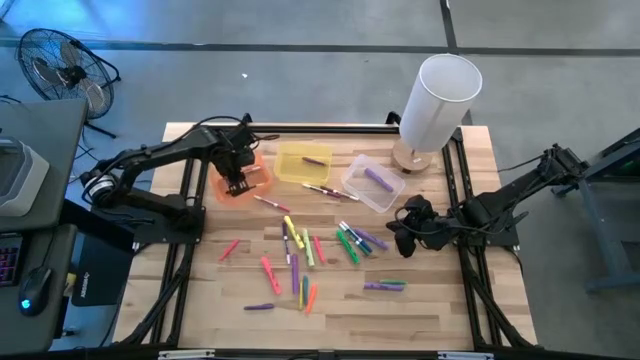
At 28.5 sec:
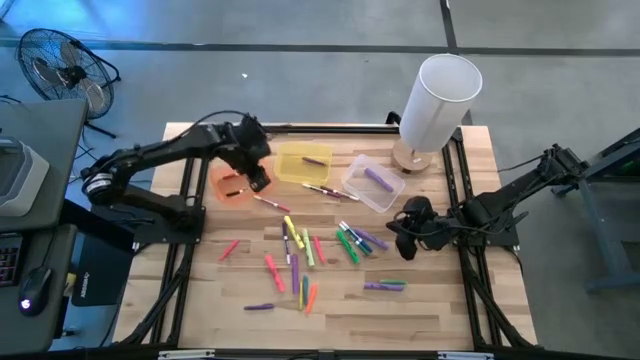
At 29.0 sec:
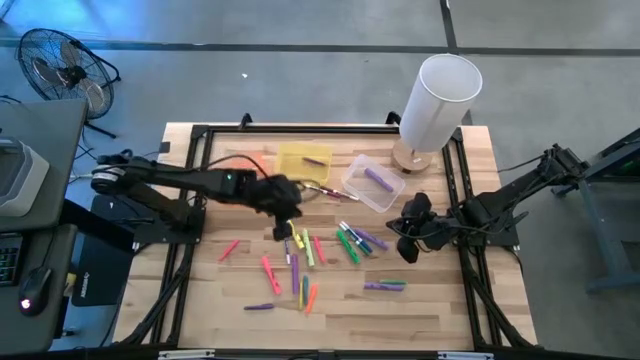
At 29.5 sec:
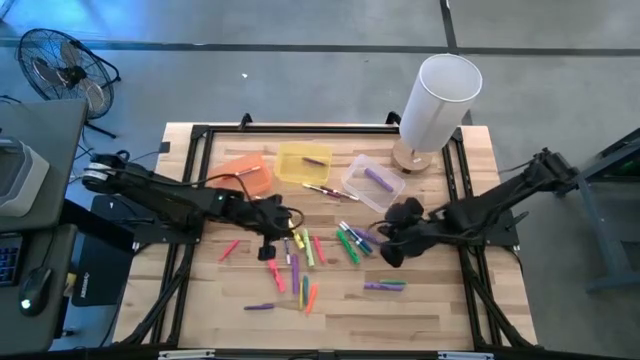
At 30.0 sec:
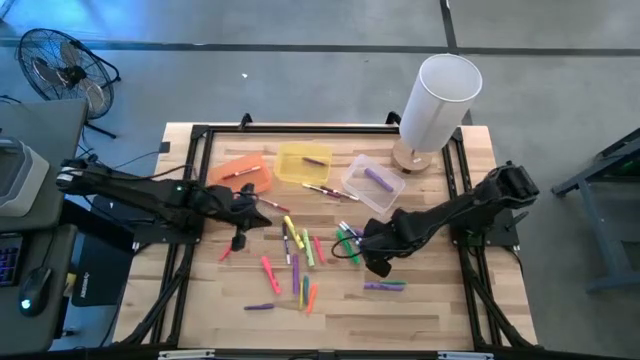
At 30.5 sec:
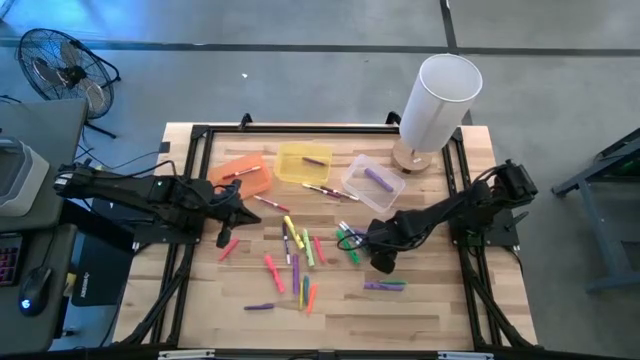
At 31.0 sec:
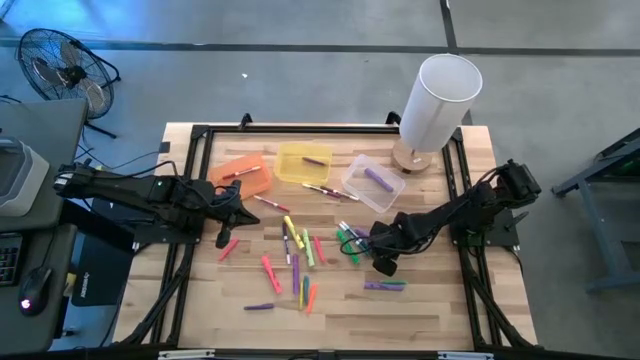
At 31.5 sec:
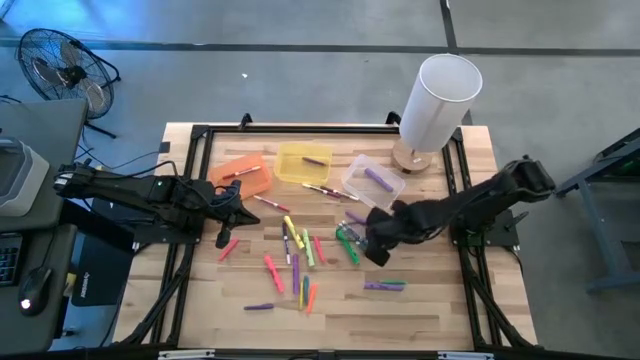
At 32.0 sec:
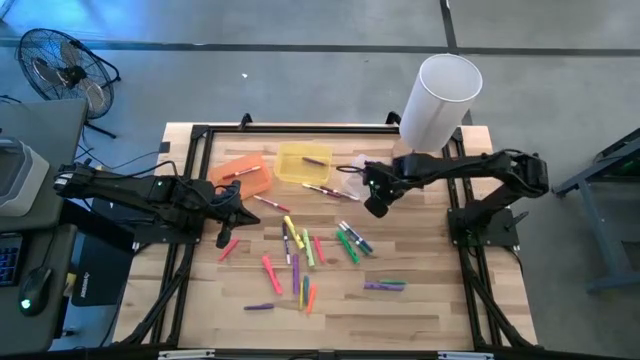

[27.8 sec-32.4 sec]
Task: Pick & Place Markers
Put the top purple highlighter pen into the white bin

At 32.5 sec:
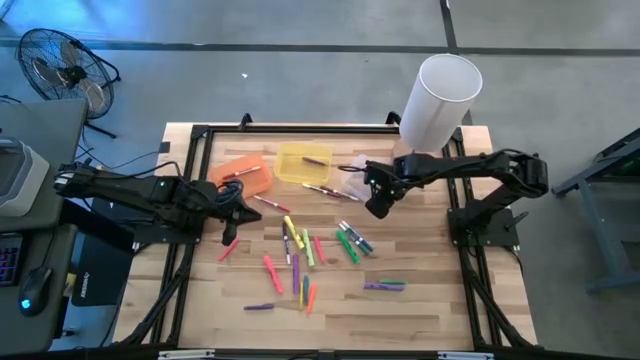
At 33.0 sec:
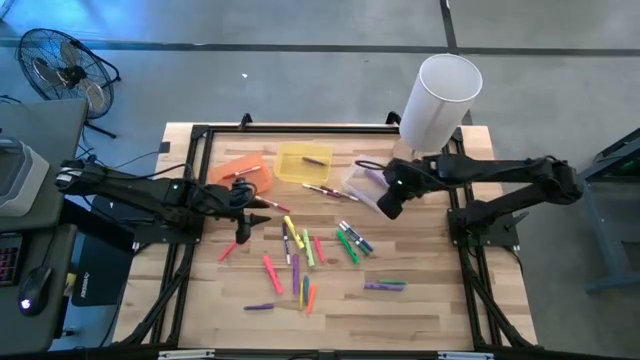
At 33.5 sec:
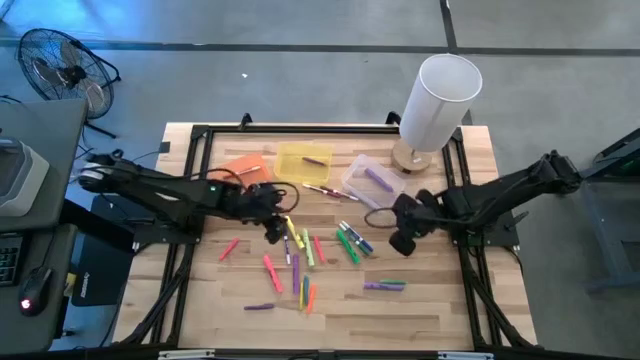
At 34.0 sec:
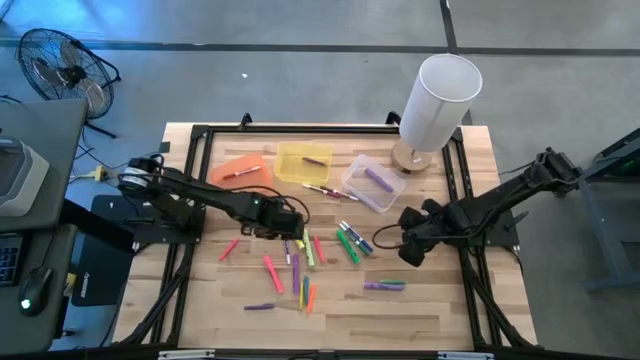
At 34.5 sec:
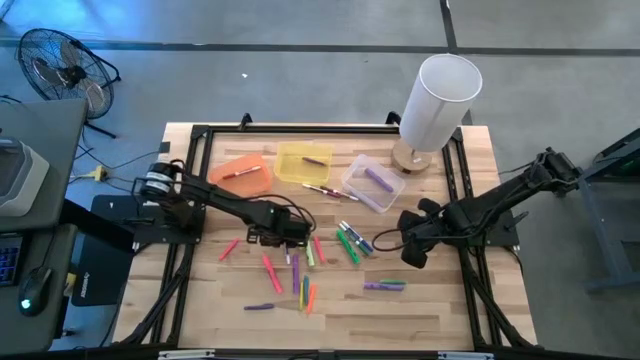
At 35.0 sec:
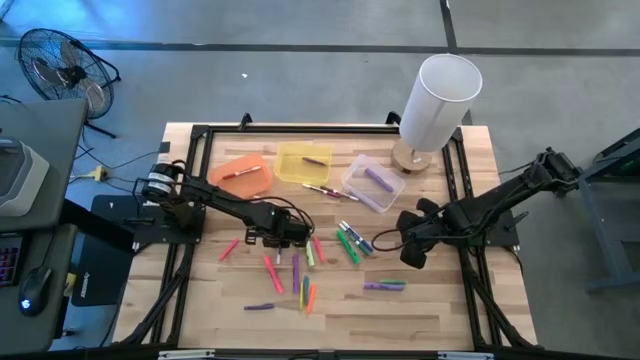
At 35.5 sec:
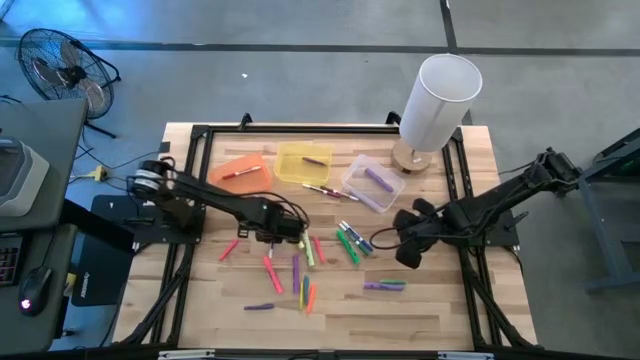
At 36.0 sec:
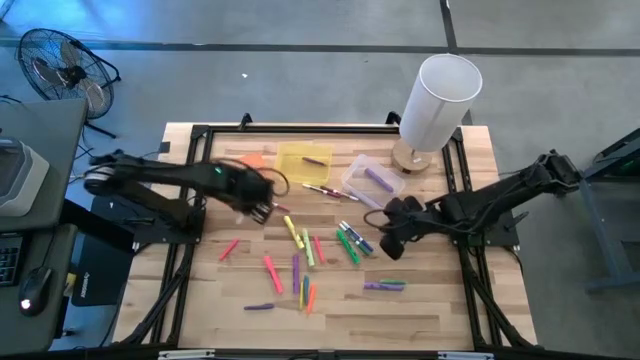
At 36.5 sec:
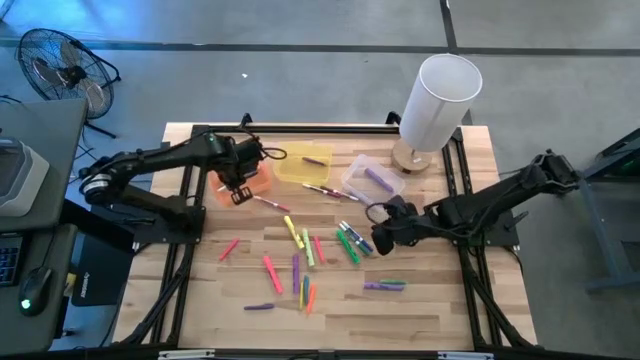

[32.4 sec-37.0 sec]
Put the dark blue marker pen into the orange bin

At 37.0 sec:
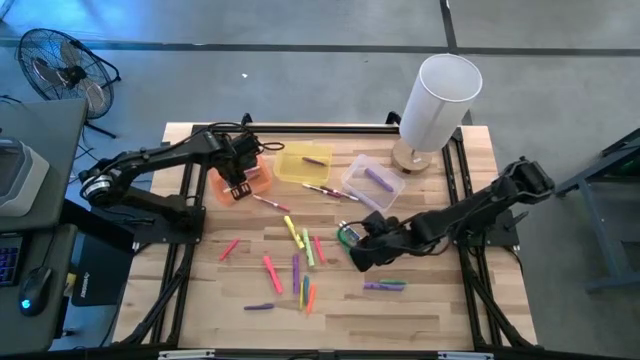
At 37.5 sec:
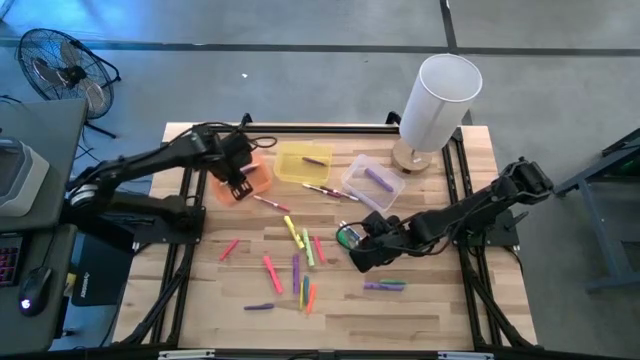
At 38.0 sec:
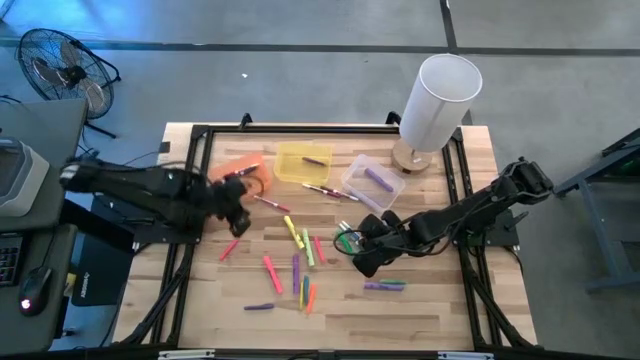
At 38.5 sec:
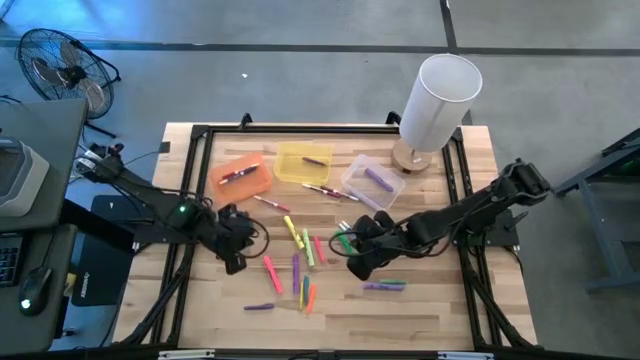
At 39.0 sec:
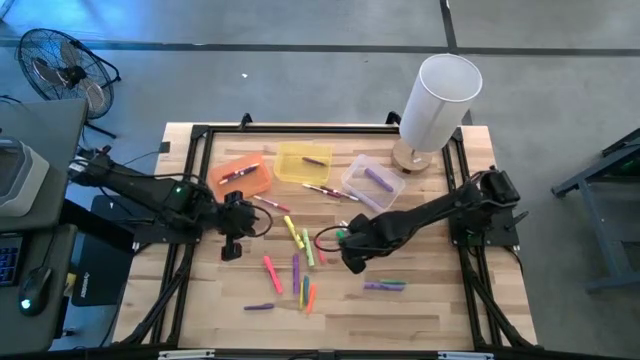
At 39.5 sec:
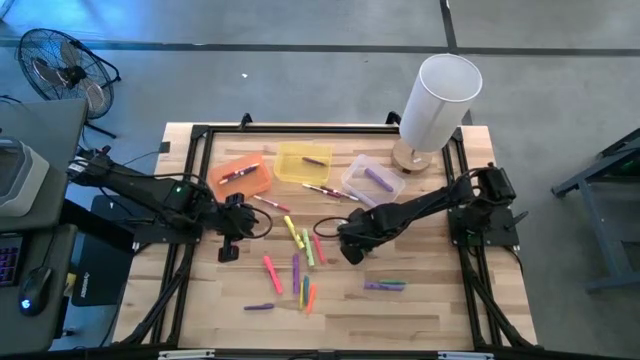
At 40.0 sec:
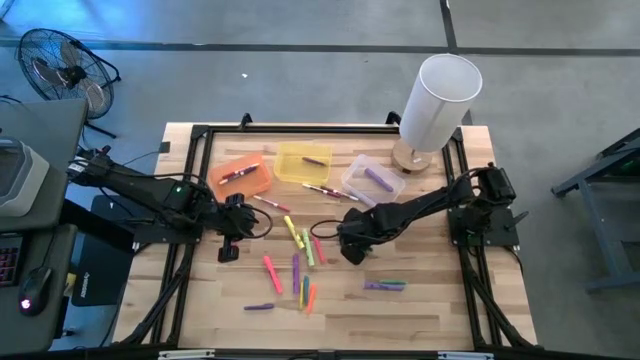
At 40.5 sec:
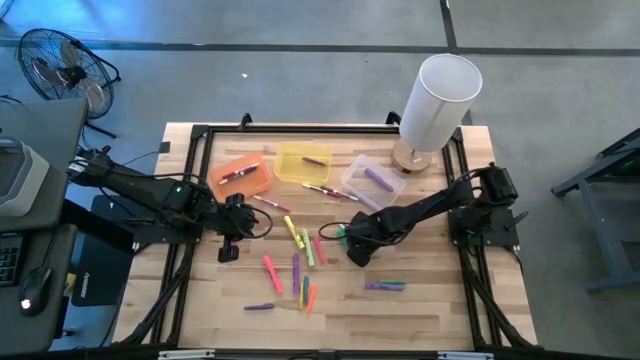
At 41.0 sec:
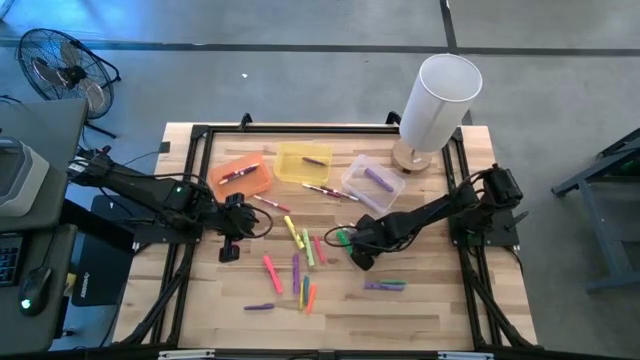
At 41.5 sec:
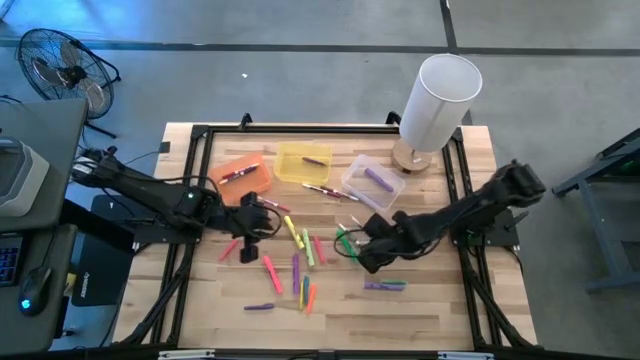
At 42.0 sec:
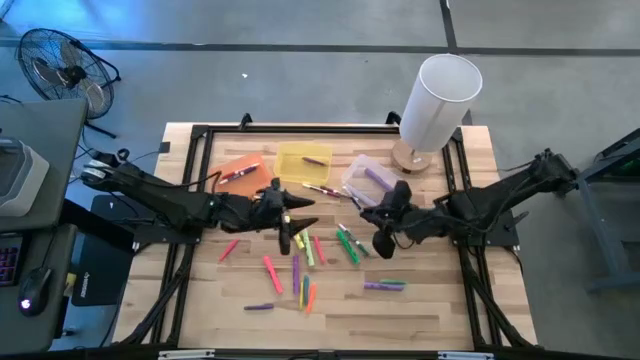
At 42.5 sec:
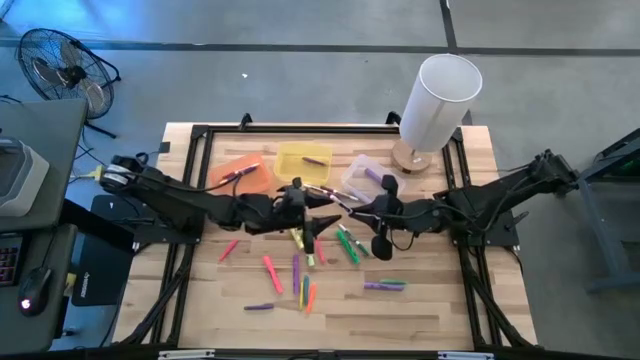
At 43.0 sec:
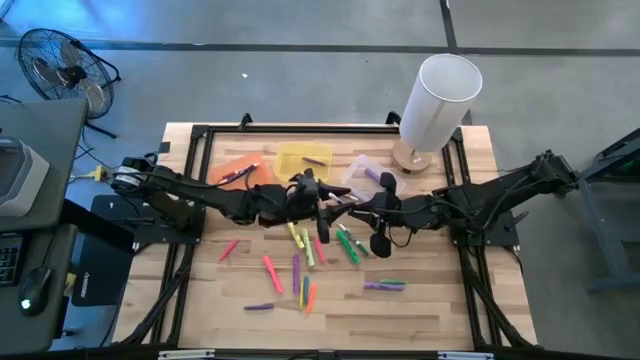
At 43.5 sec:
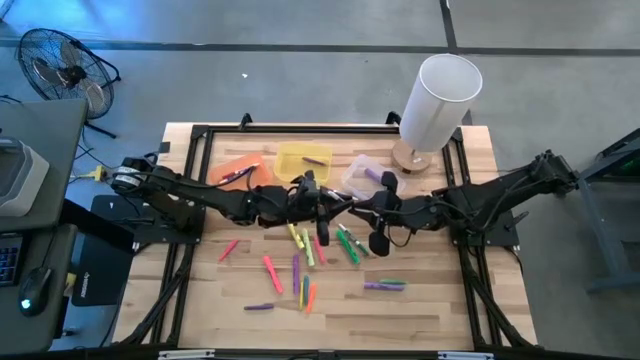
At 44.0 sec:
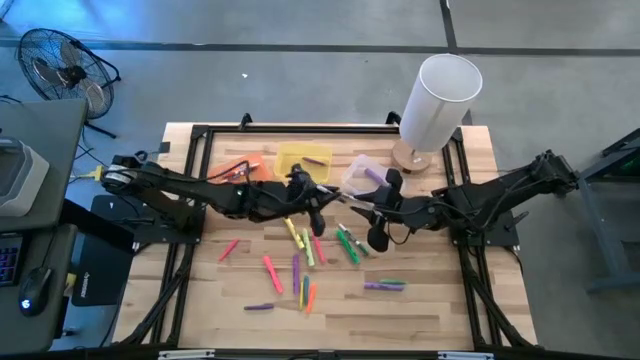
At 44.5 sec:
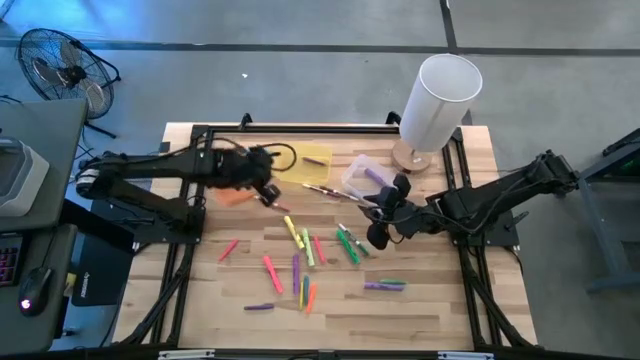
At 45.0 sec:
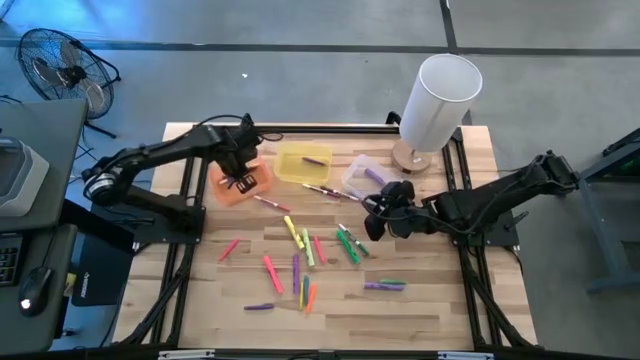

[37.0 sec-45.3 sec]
Put the blue marker pen into the orange bin

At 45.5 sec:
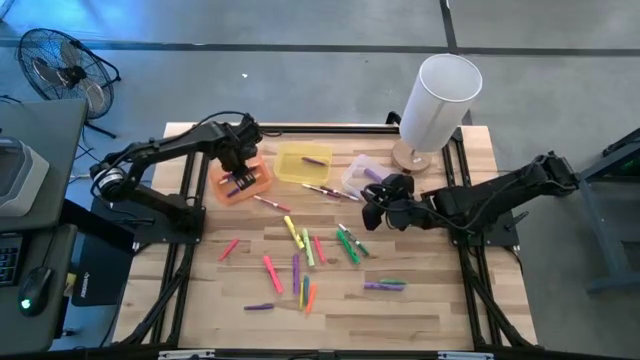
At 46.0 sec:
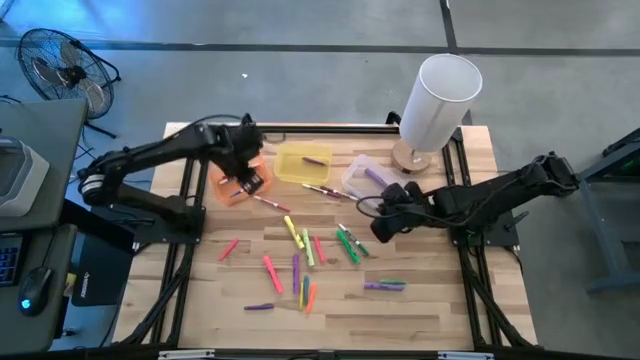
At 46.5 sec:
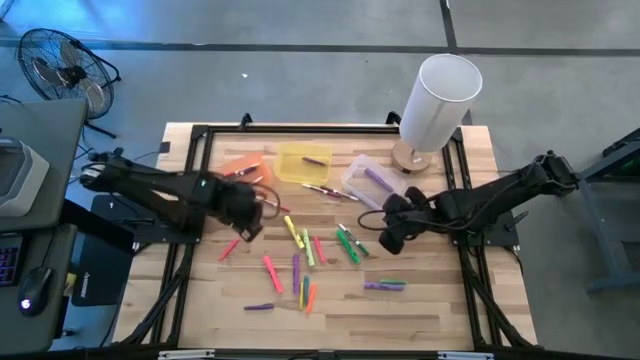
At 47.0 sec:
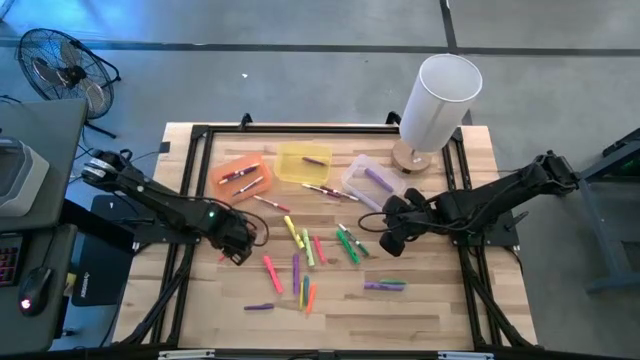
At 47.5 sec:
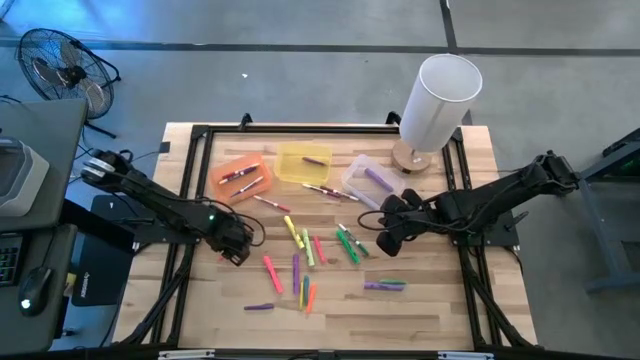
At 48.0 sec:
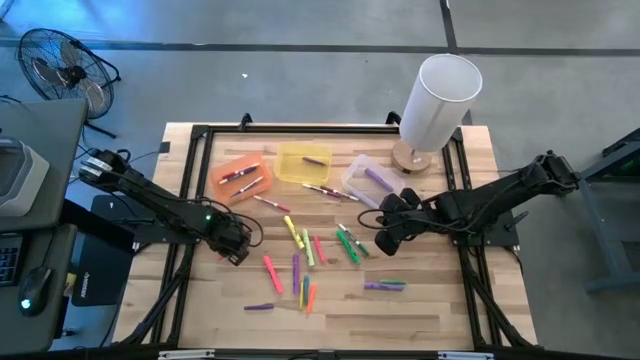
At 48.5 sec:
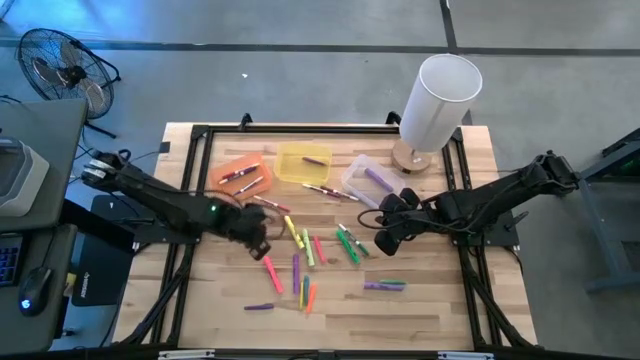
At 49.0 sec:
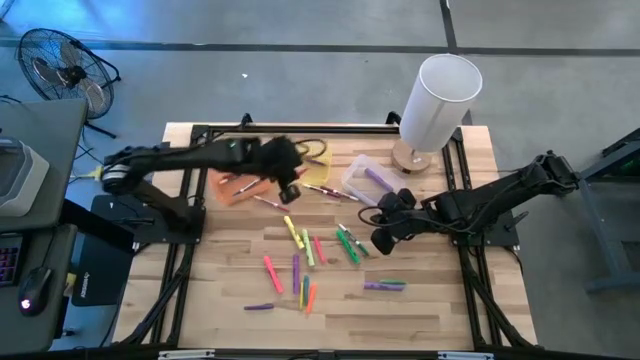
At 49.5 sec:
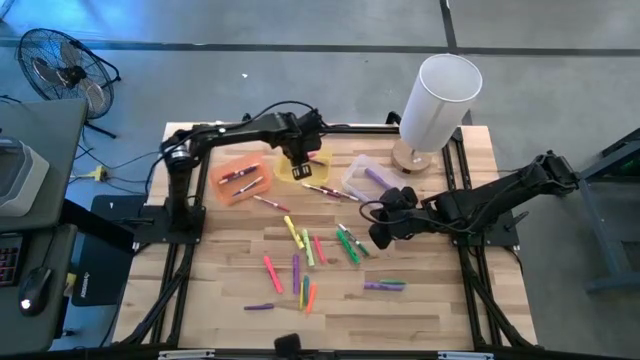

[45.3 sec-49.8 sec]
Put the left pink pen into the yellow bin
